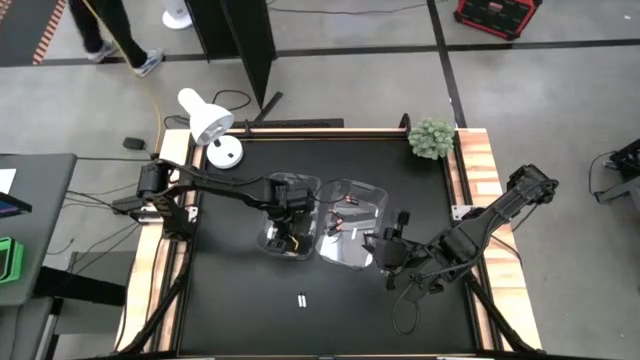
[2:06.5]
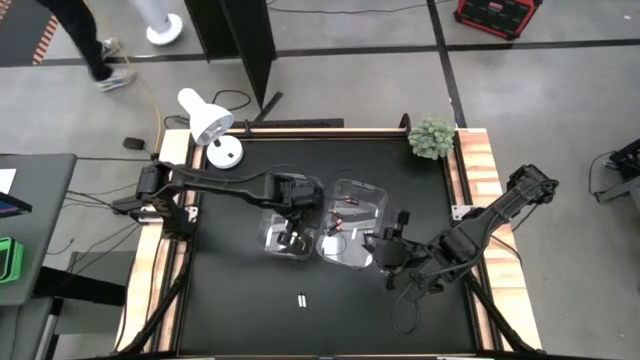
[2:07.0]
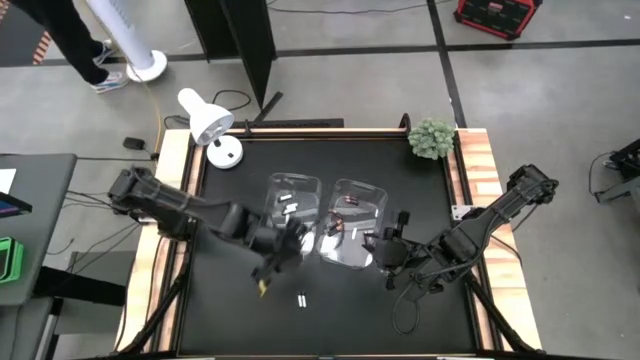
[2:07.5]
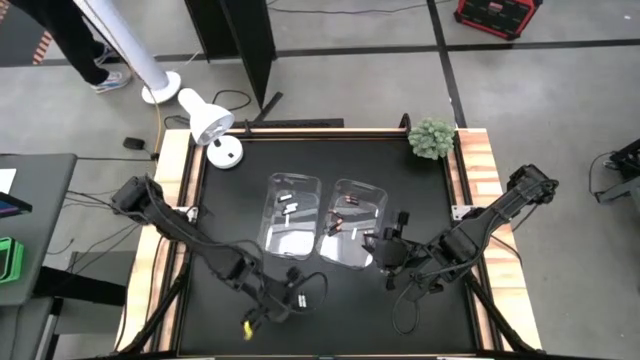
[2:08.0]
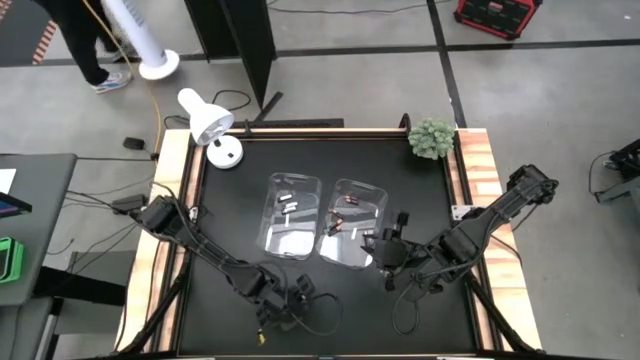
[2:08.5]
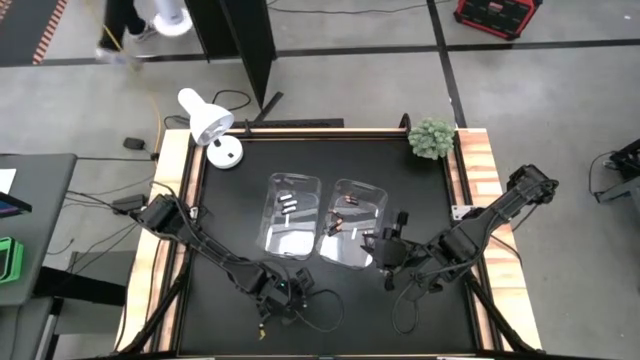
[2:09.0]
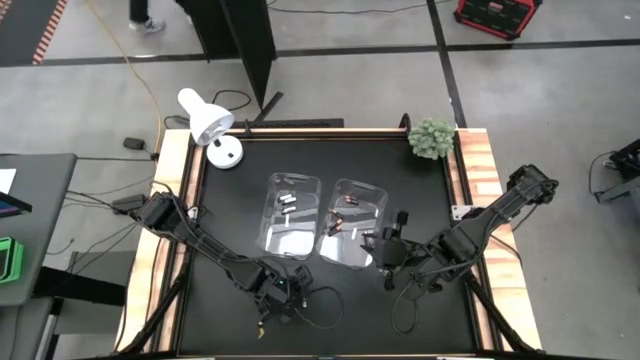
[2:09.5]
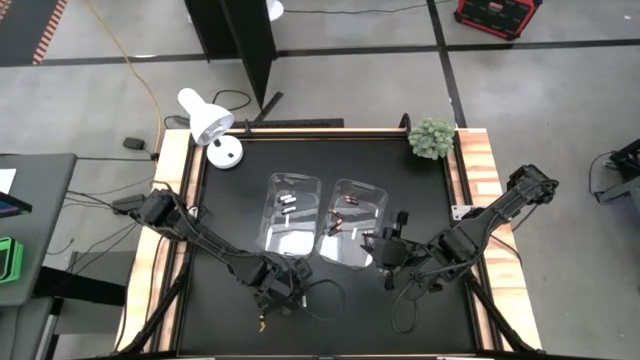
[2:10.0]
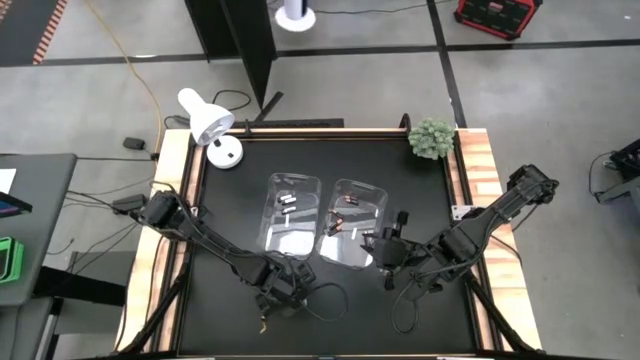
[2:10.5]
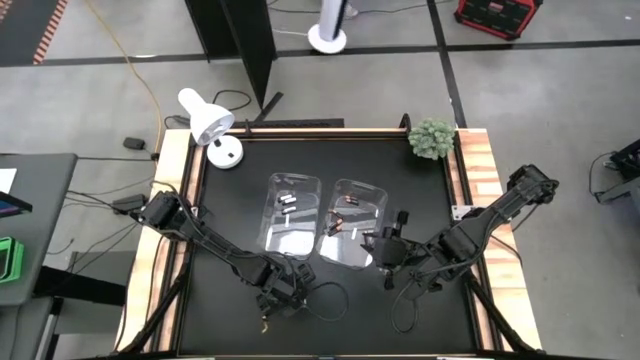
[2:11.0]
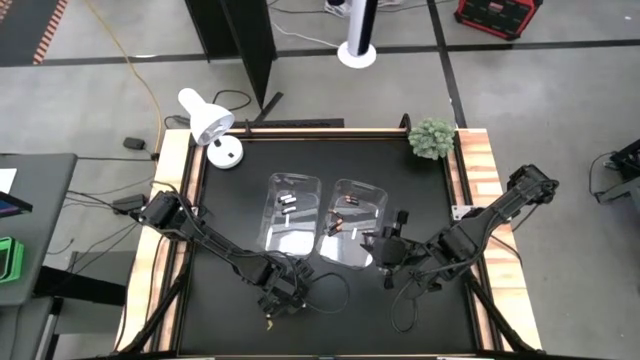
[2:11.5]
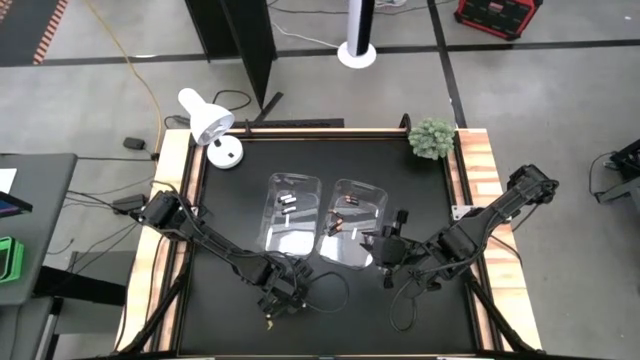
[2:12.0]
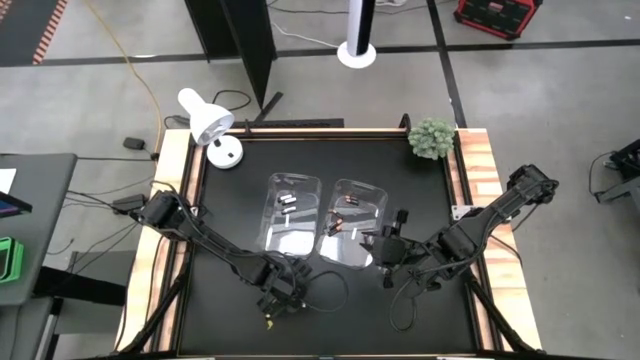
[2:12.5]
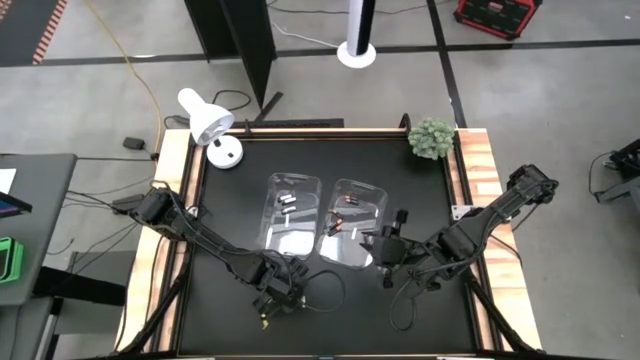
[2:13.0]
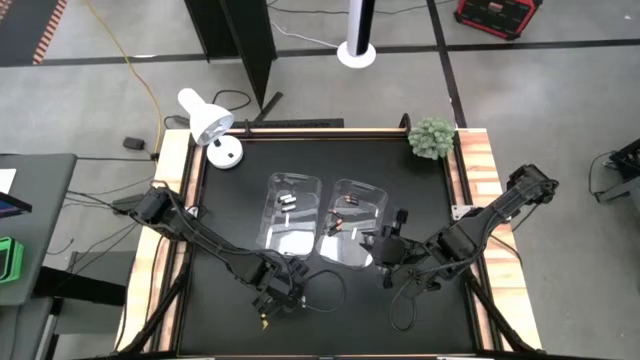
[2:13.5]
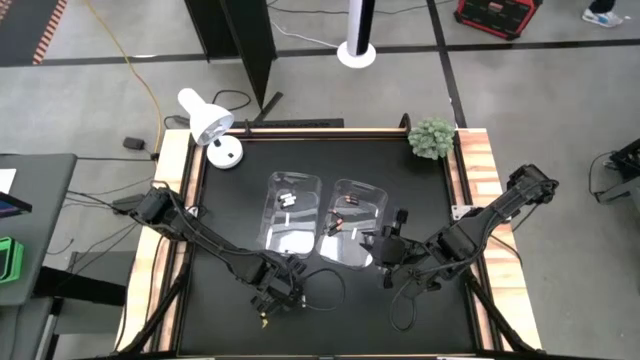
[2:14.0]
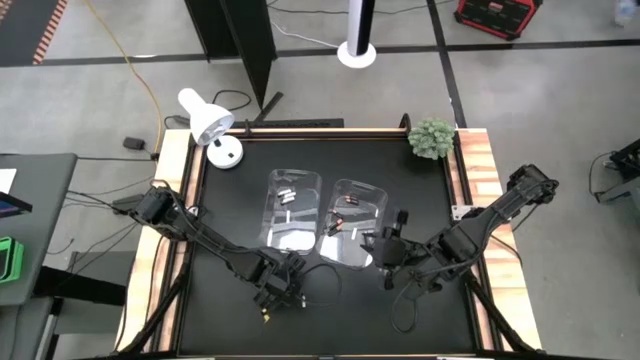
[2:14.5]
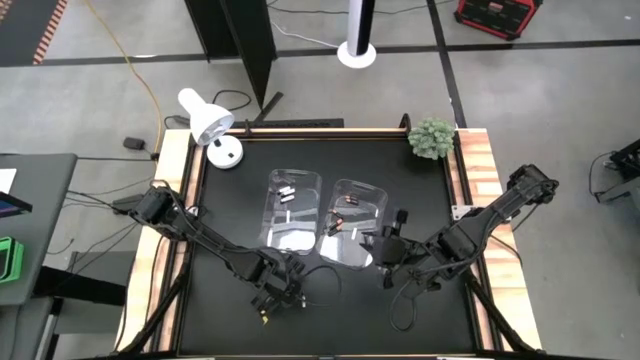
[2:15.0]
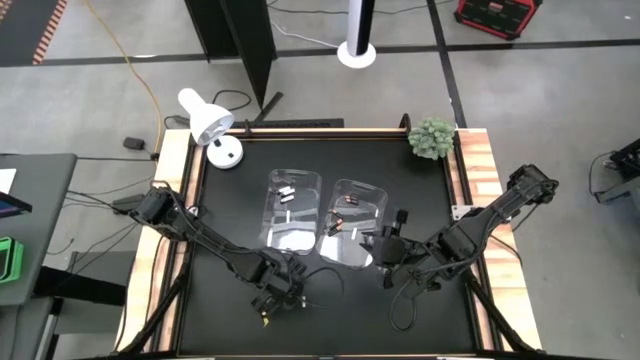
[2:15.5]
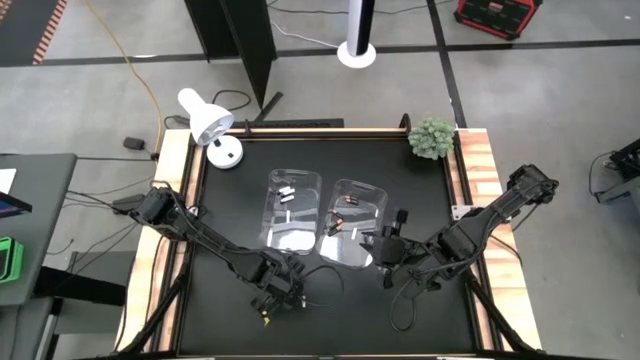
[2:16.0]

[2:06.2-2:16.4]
Task: Sort batteries
Put the white battery into the left transparent bin

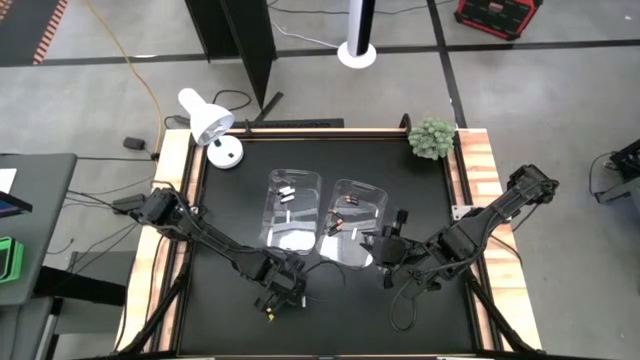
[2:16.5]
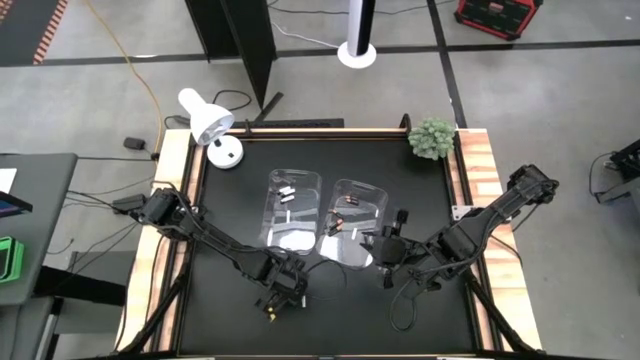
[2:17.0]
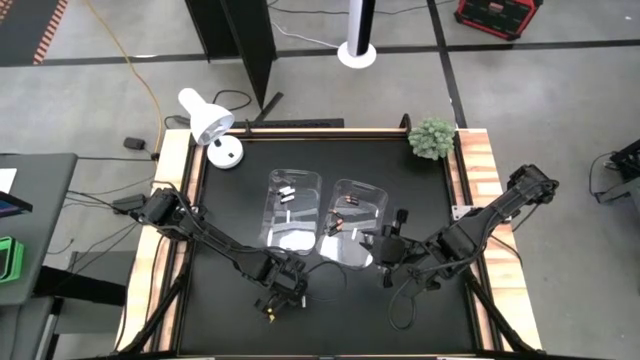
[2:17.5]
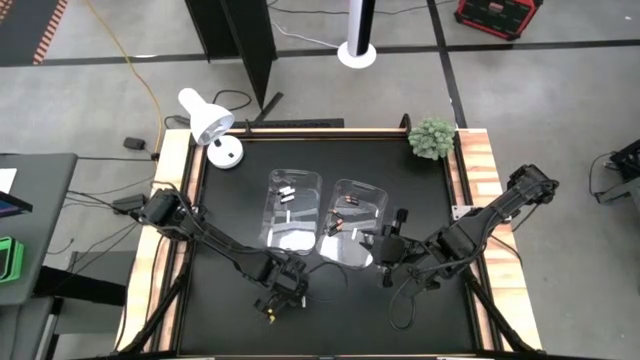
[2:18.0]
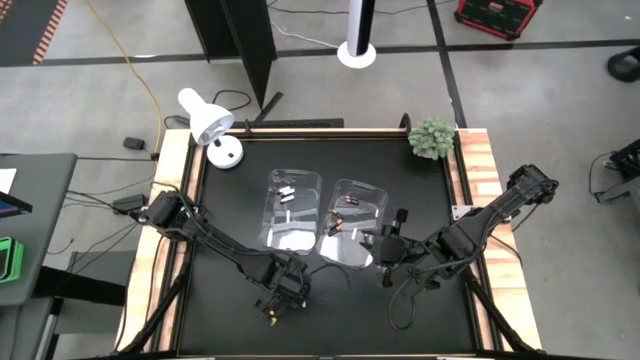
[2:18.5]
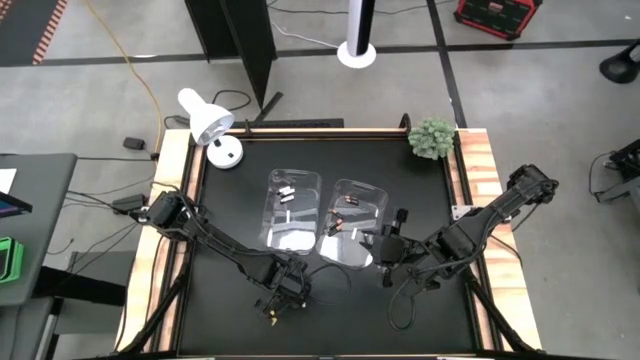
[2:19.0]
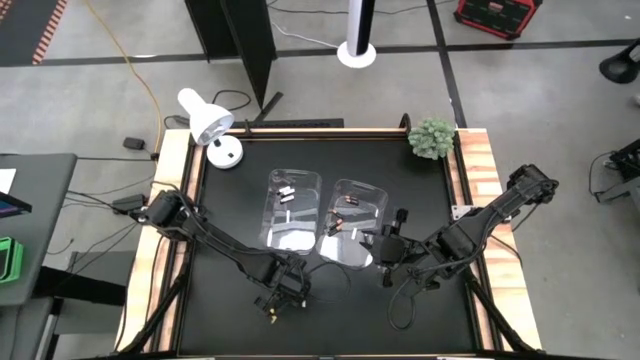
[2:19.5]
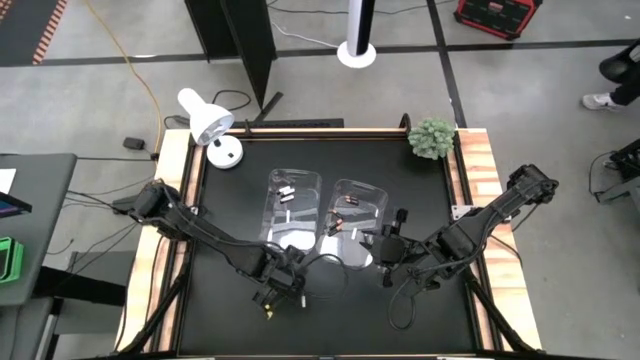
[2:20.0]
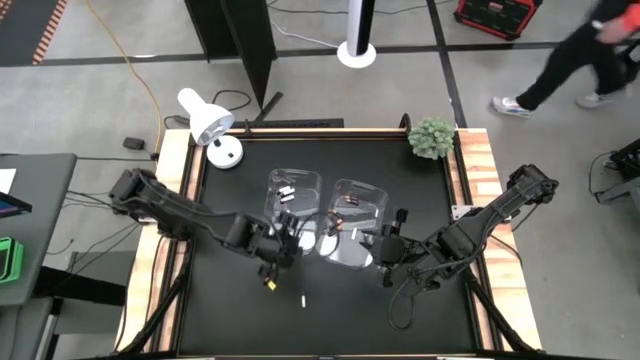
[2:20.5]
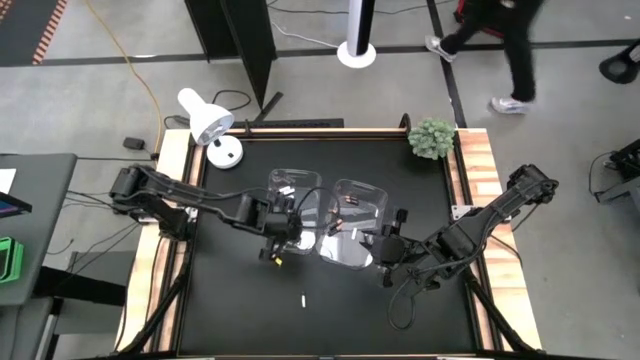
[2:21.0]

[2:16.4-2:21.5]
Put the white battery into the left transparent bin

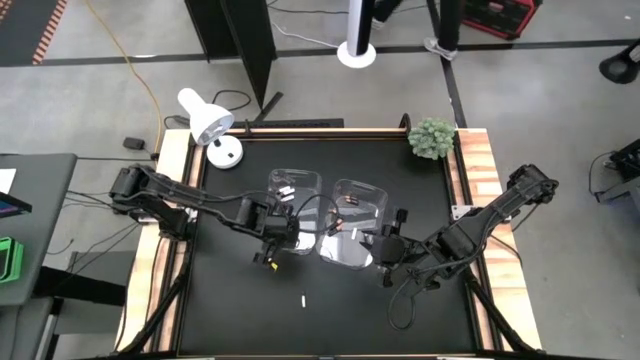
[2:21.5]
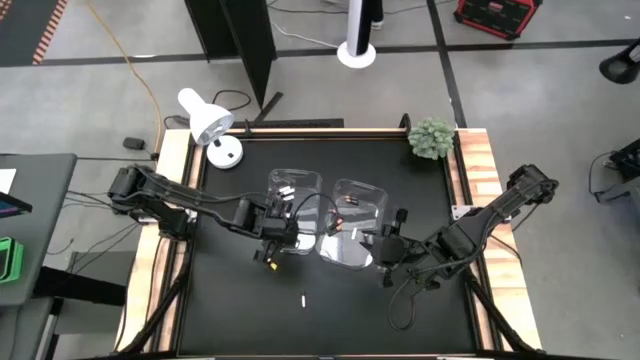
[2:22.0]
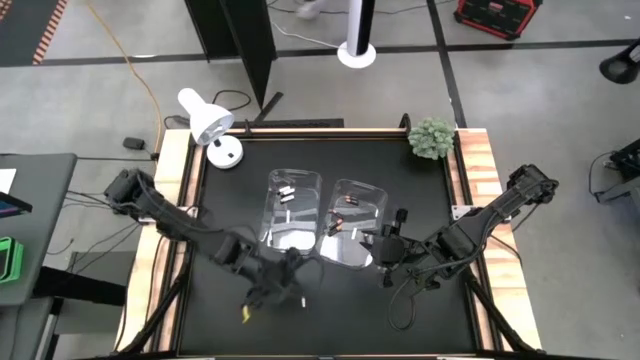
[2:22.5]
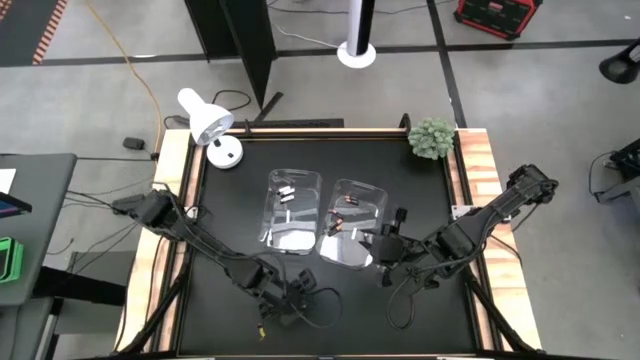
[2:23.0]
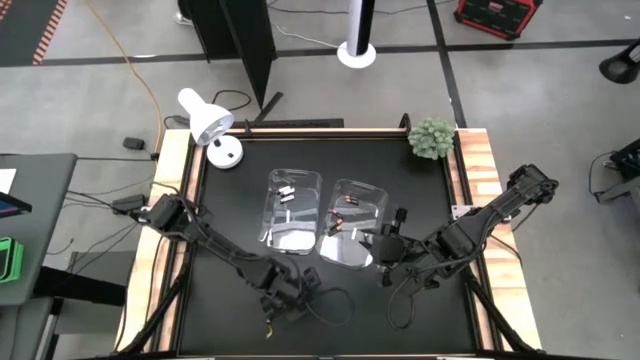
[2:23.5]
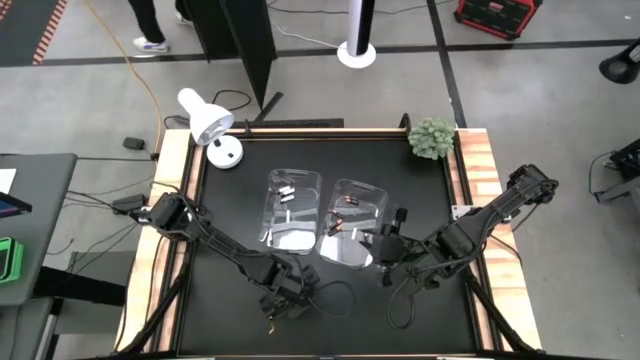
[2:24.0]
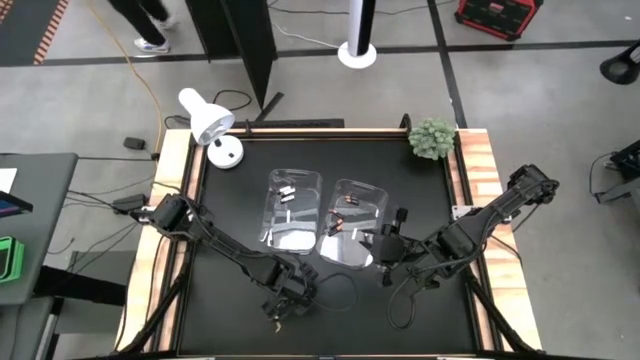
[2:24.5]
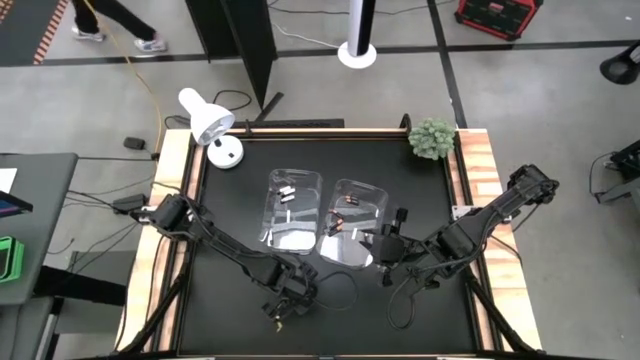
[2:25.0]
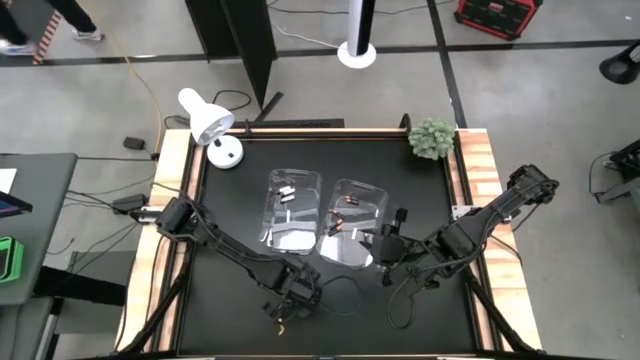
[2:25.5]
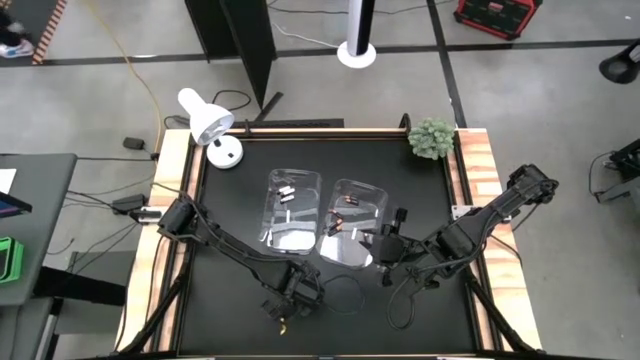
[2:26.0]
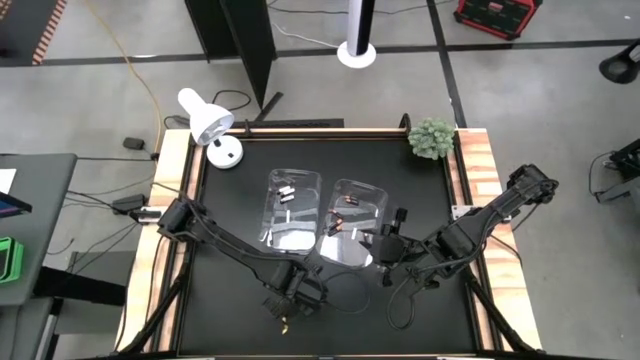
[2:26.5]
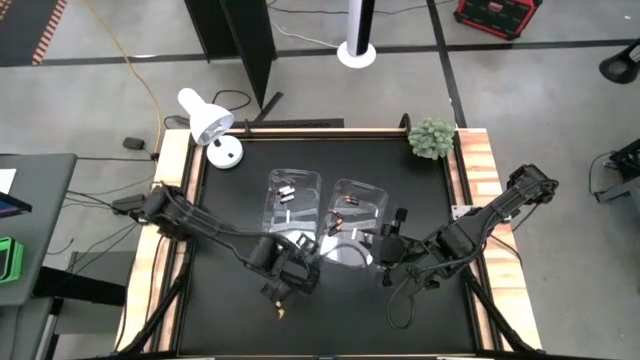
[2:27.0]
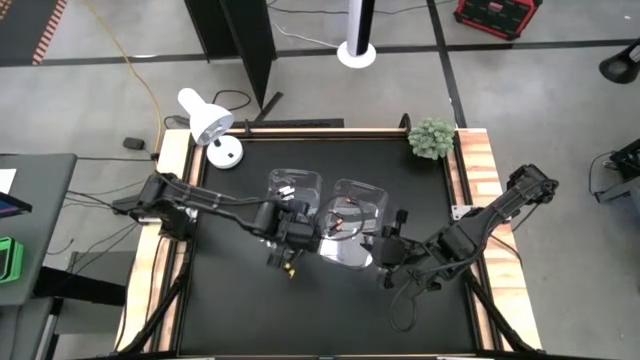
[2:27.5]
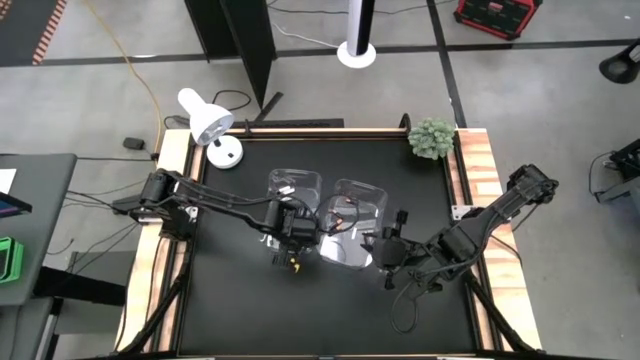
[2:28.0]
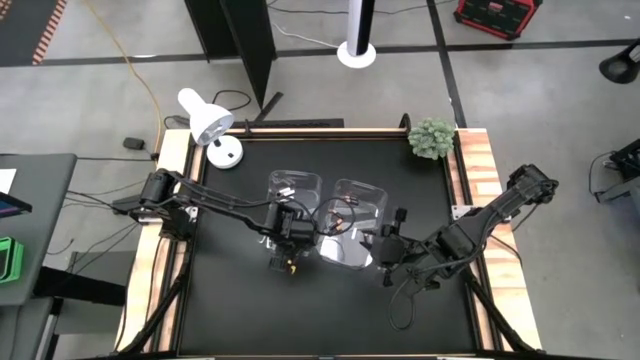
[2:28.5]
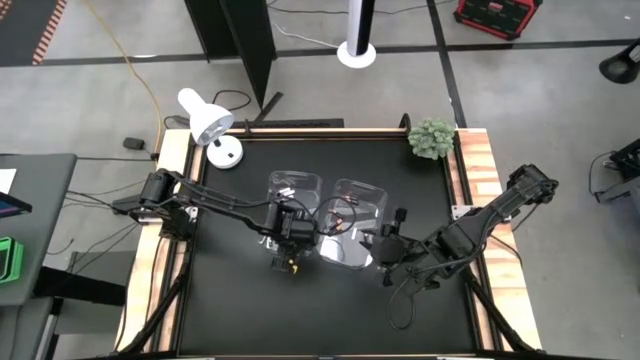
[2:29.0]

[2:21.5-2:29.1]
Put the white battery into the left transparent bin
